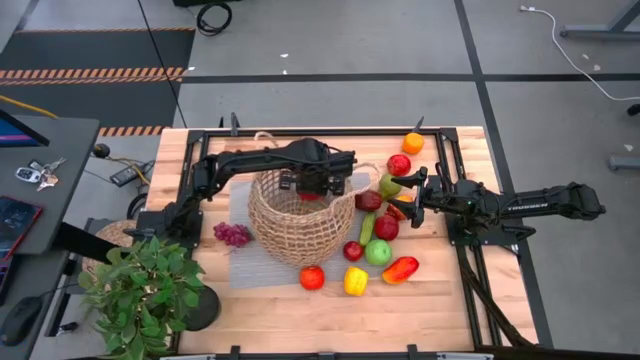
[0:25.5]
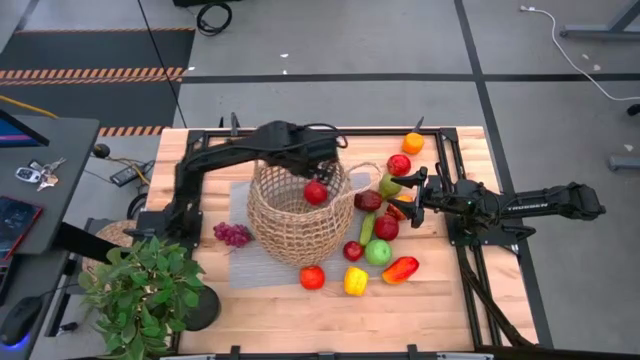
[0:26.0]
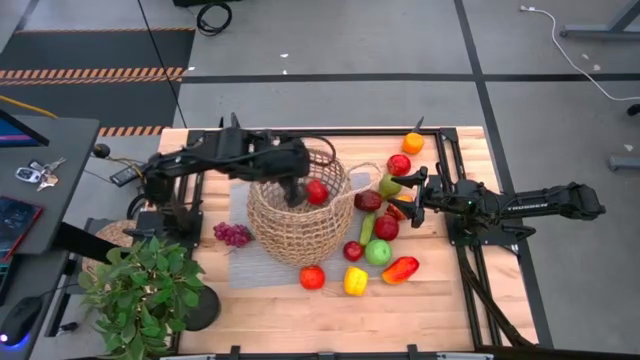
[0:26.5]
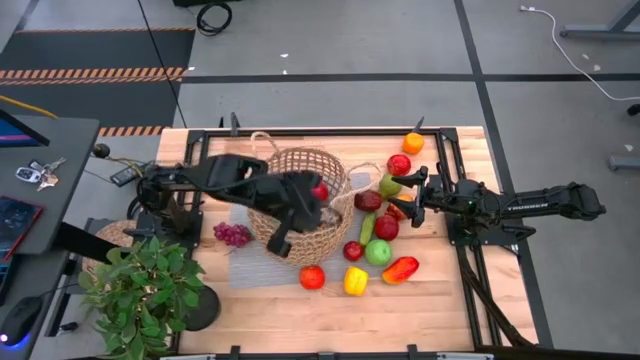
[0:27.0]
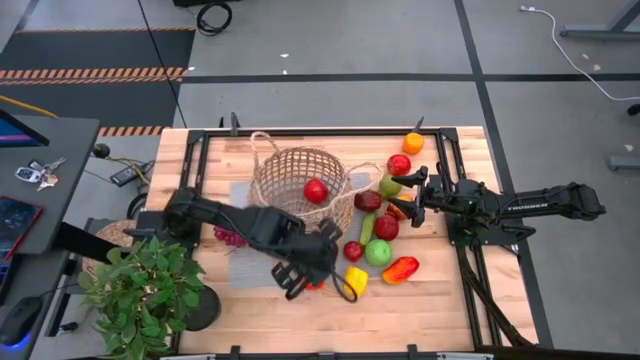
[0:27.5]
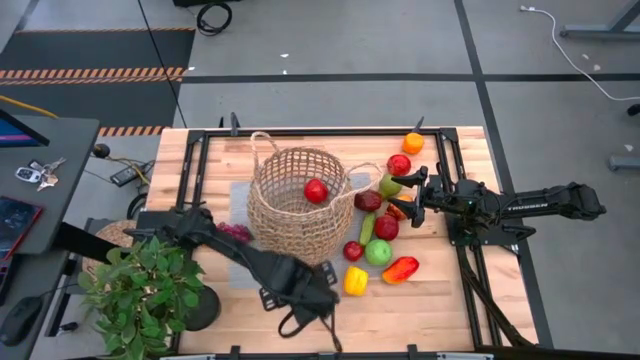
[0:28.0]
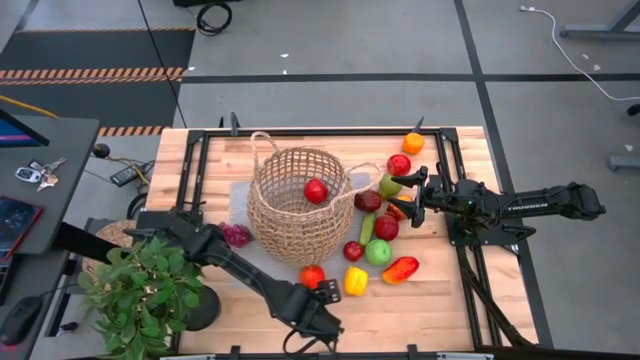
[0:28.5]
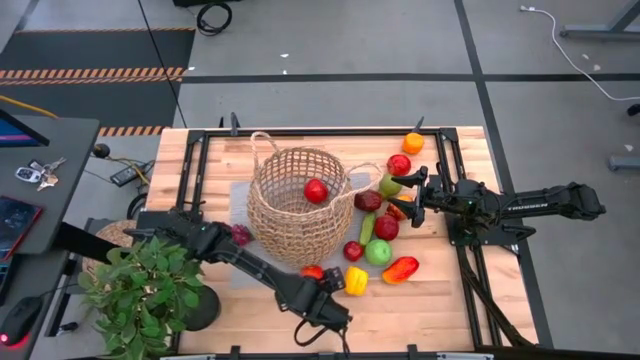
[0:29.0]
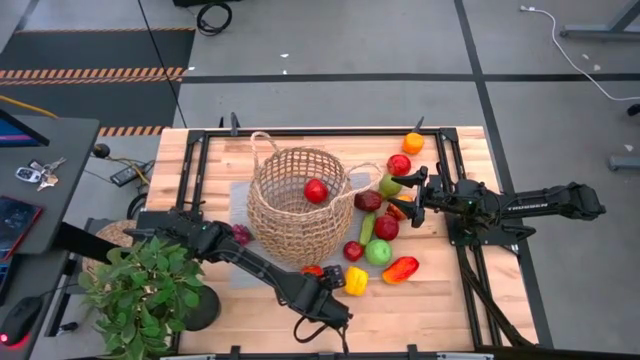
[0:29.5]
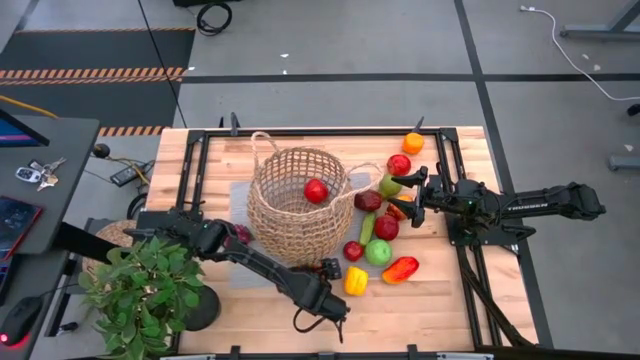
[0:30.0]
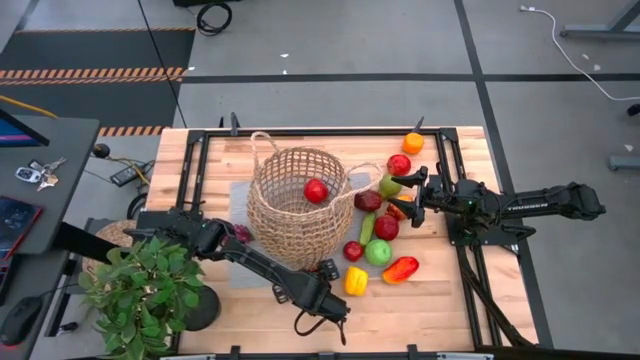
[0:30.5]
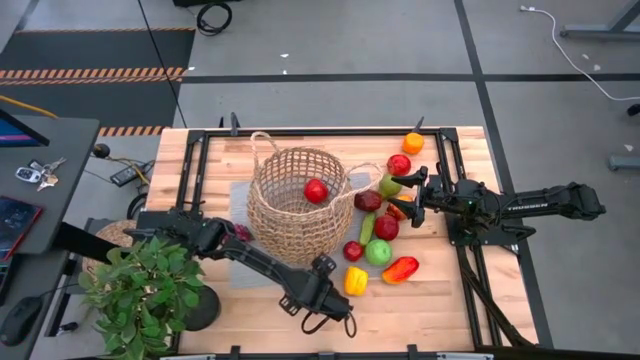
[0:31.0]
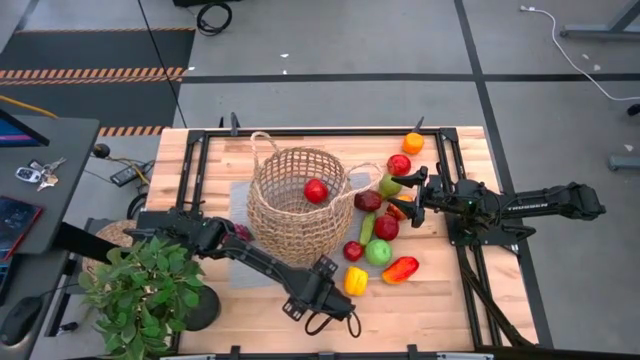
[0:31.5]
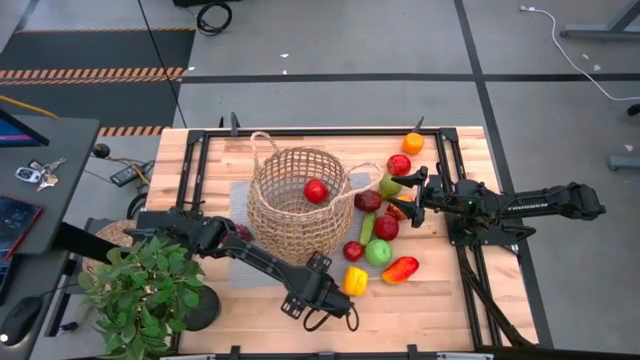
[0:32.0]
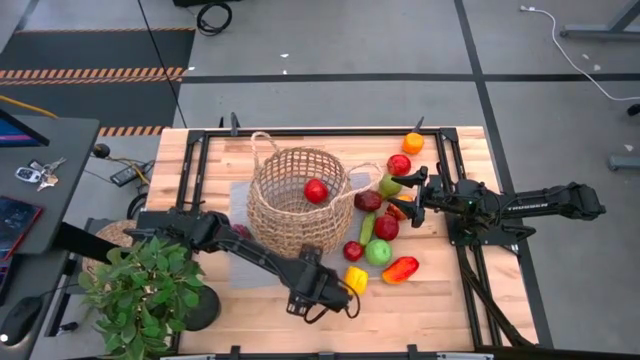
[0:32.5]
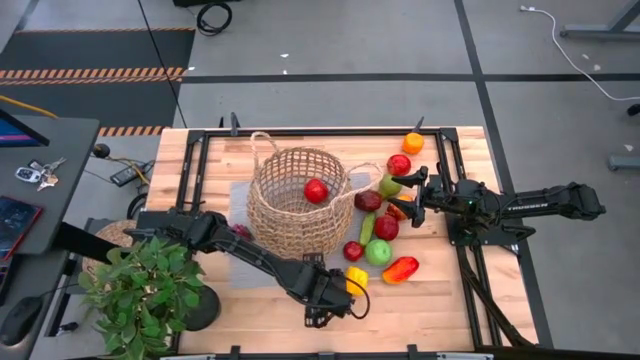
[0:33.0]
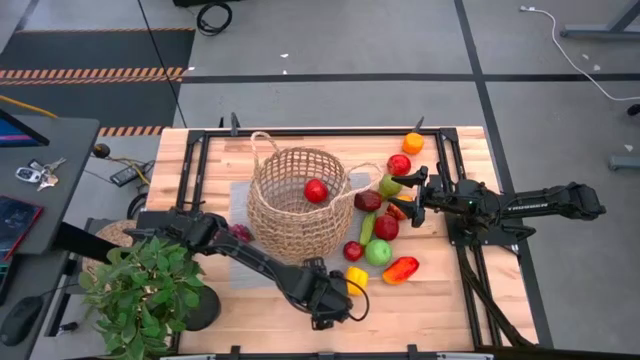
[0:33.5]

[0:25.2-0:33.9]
Task: Build produce basket
Put the red apple into the brown basket

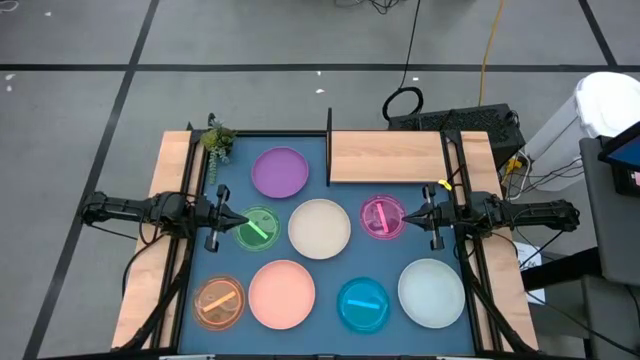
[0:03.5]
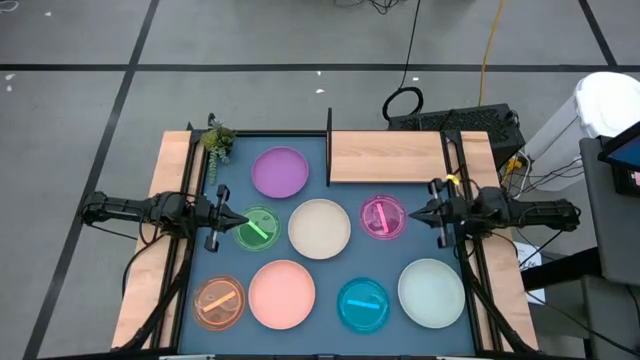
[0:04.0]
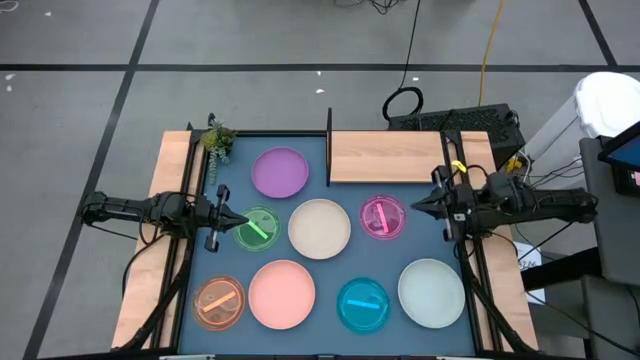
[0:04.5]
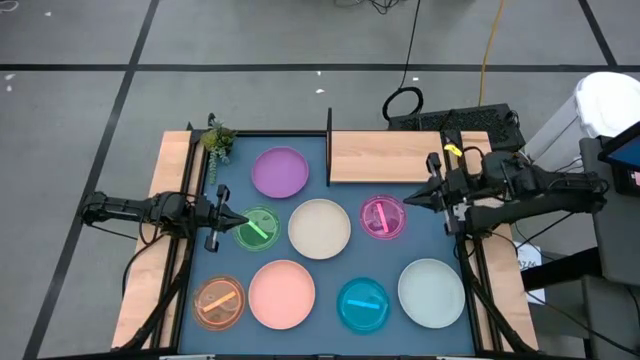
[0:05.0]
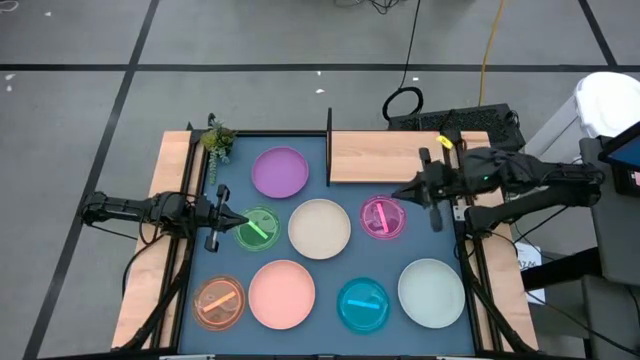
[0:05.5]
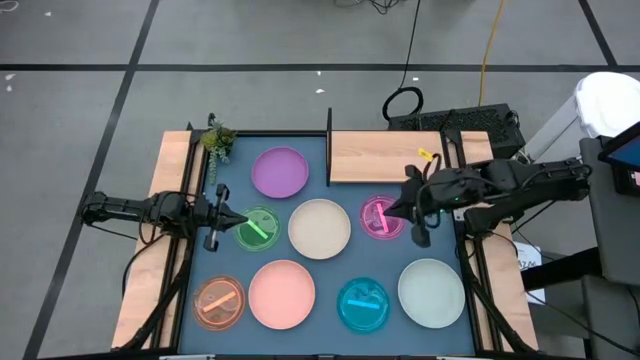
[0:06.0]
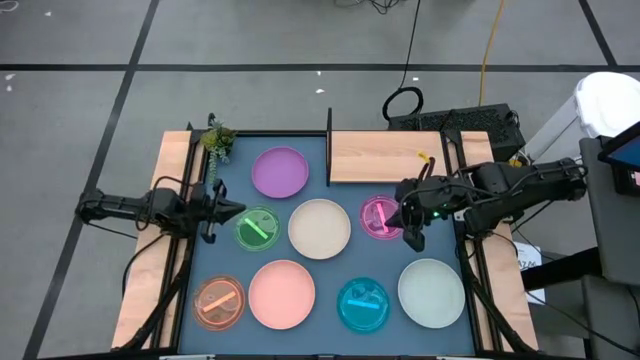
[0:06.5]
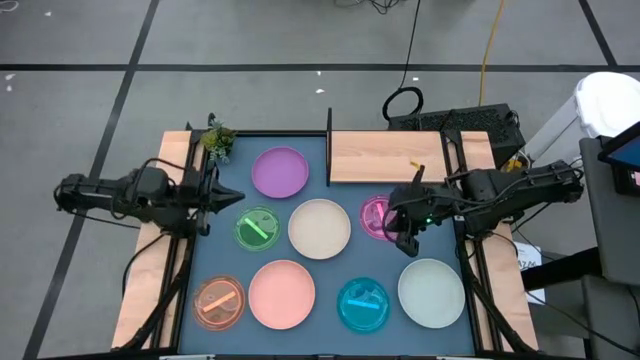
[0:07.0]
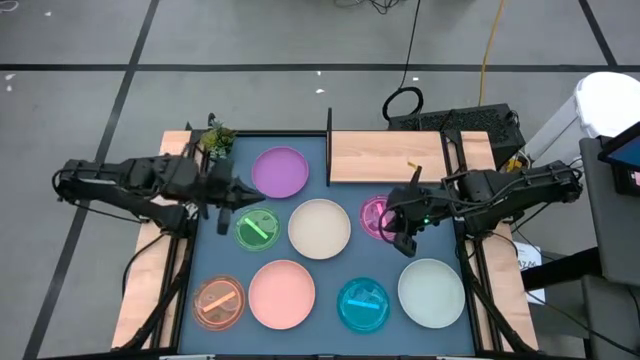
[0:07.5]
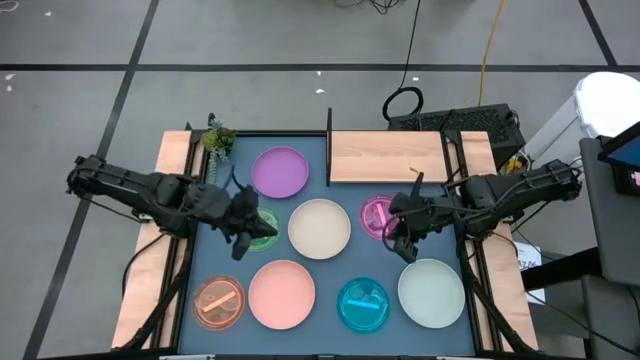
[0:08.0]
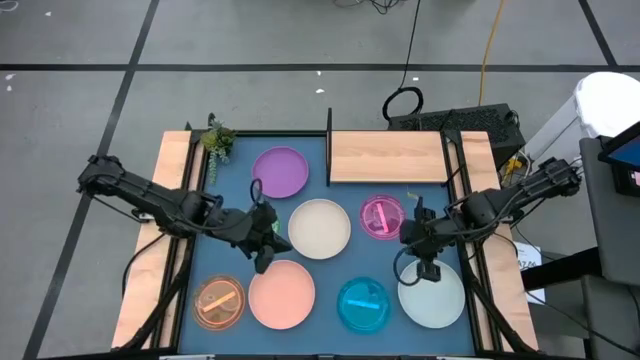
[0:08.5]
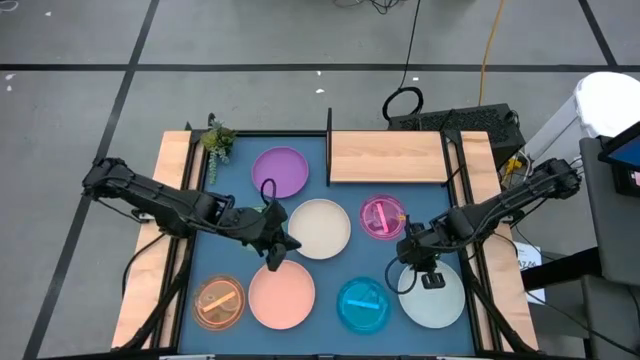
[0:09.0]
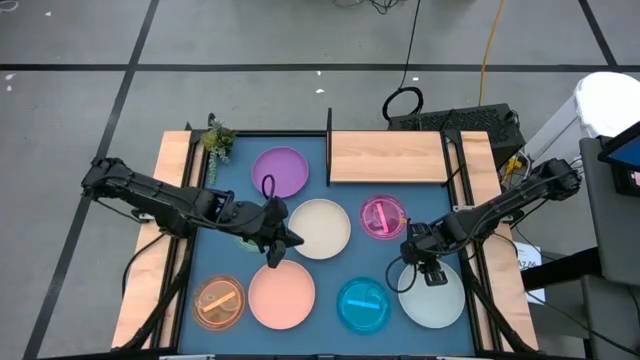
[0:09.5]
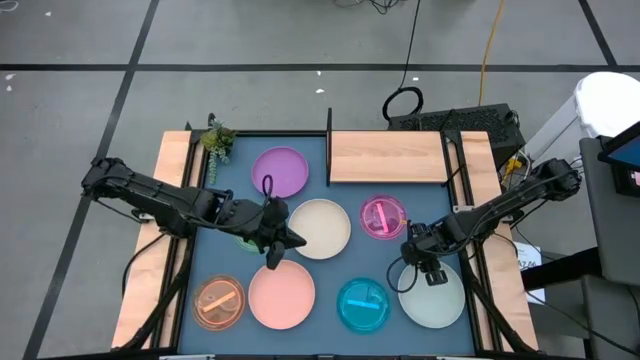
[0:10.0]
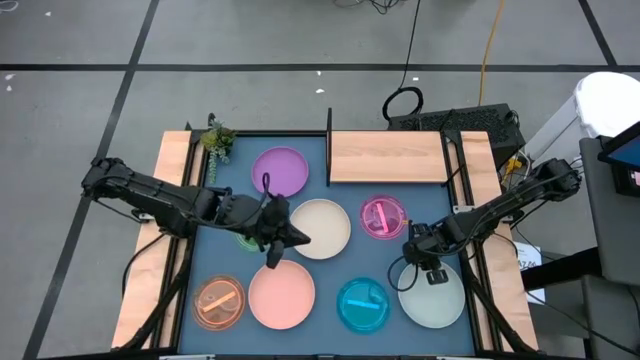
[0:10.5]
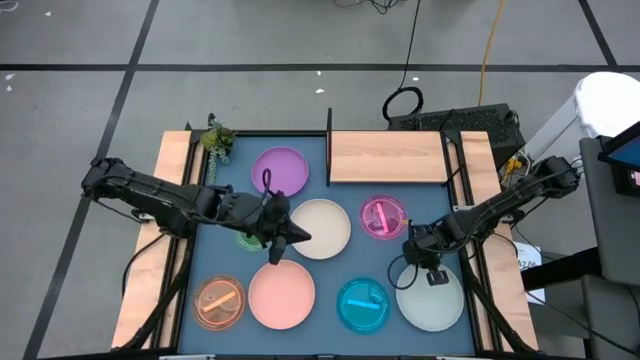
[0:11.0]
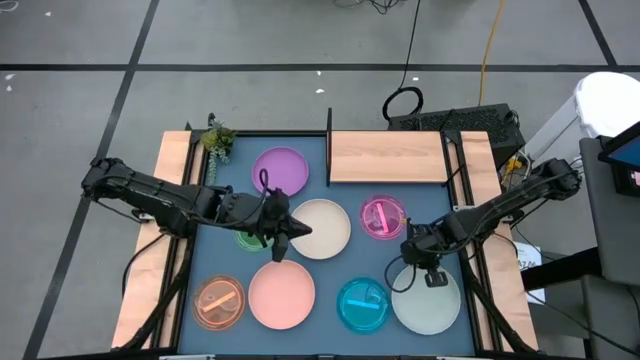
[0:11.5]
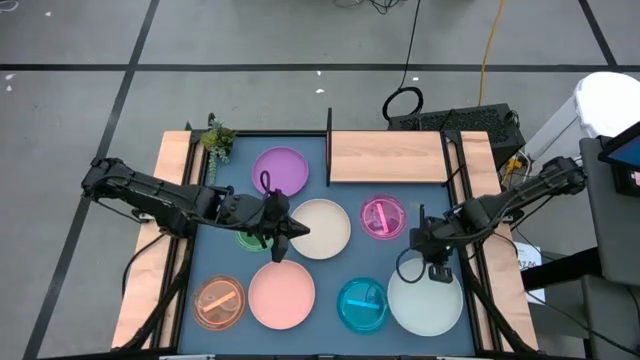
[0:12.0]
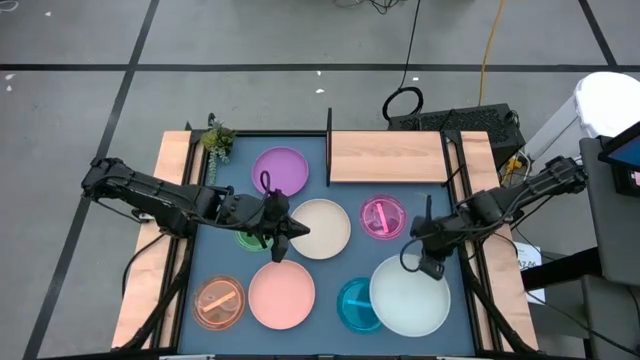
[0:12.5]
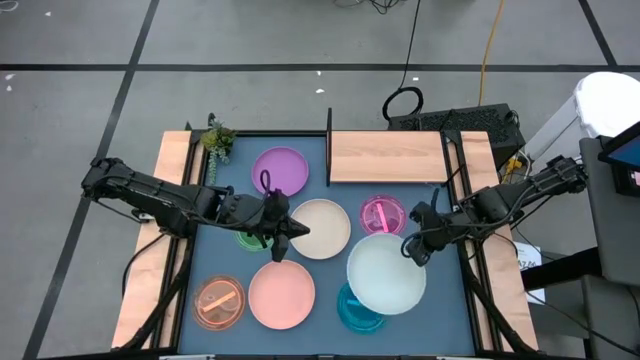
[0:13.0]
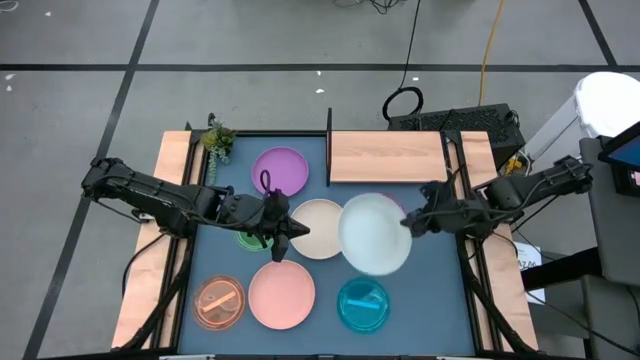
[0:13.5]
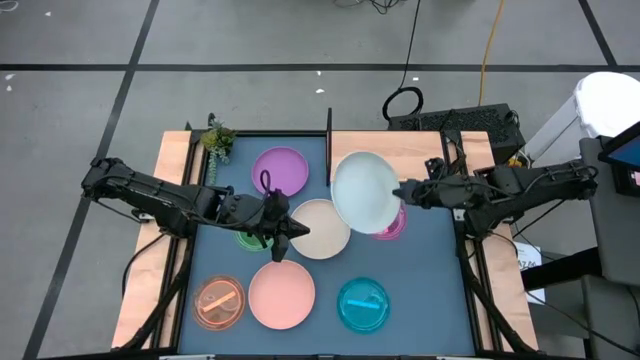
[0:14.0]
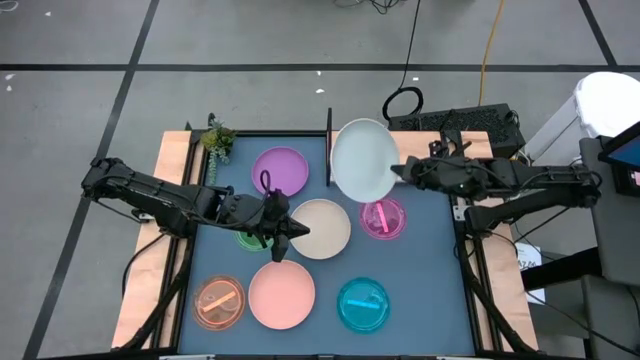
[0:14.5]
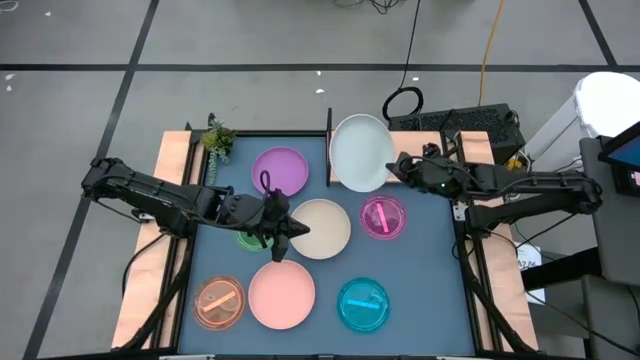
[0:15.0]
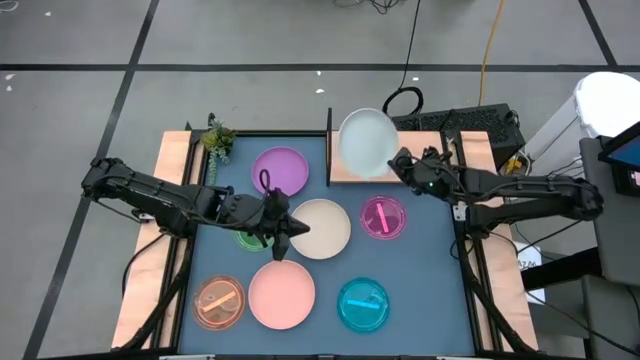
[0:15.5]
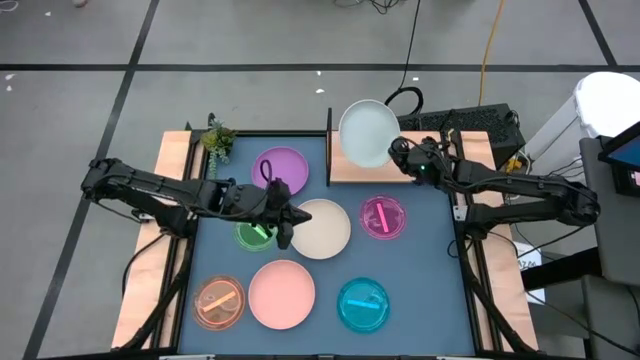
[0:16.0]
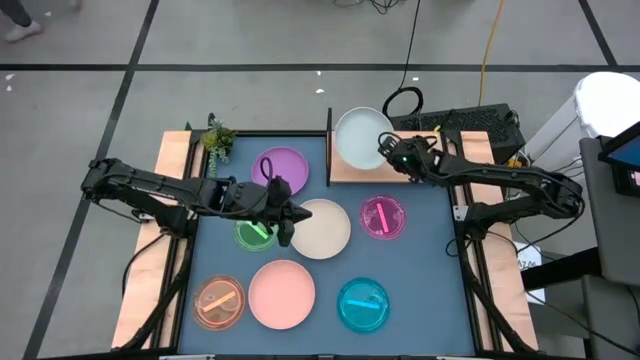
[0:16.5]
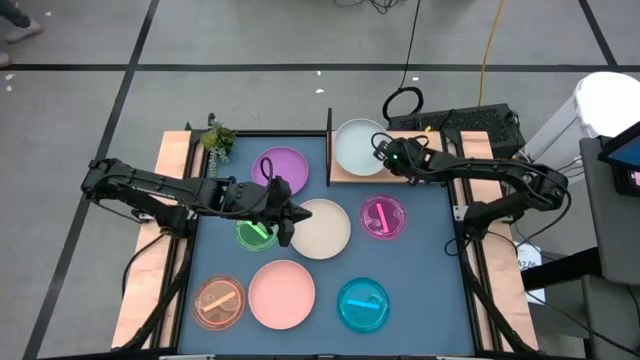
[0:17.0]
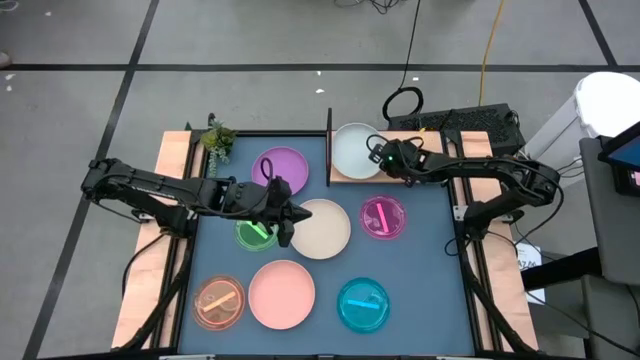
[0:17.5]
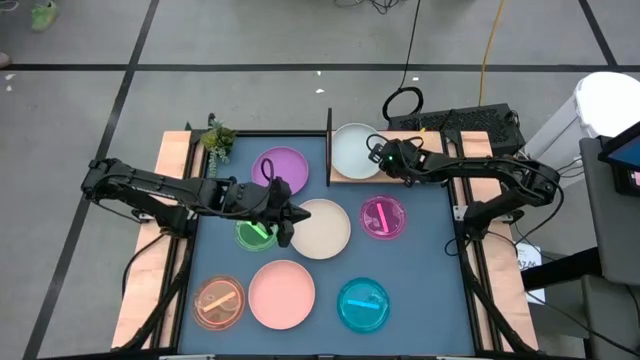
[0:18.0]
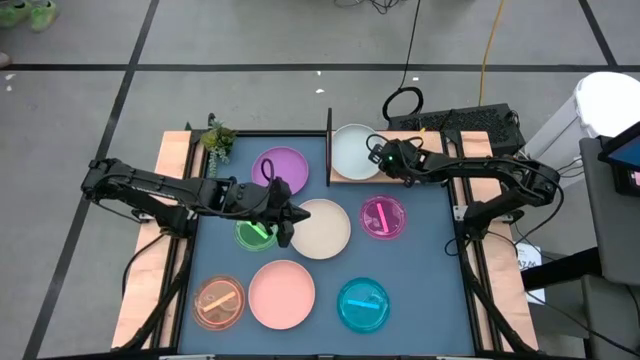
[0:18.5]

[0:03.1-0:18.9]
Task: Place and stack plates onto a shelf
Put the gray plate on the shelf
